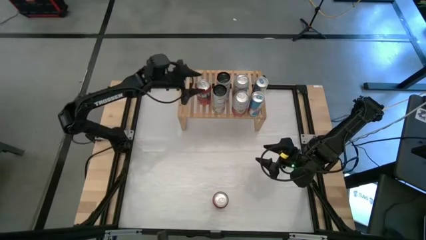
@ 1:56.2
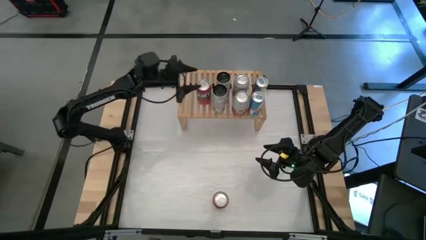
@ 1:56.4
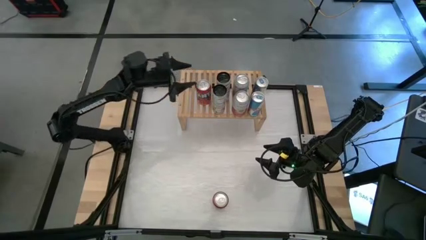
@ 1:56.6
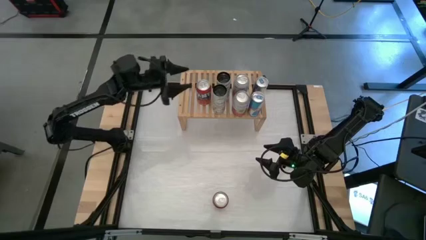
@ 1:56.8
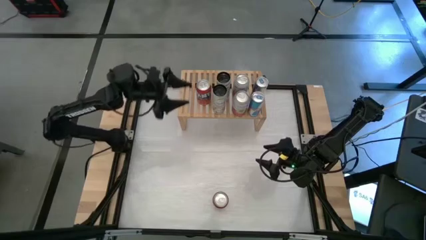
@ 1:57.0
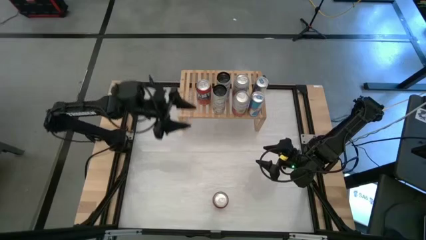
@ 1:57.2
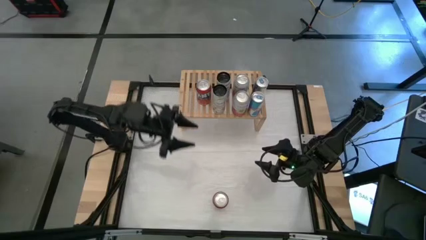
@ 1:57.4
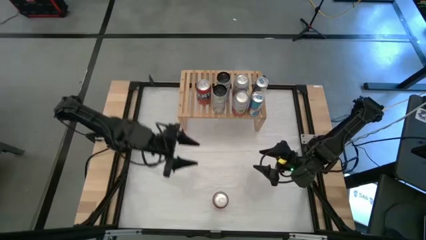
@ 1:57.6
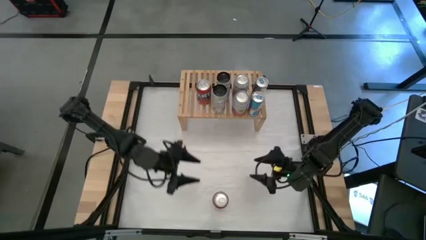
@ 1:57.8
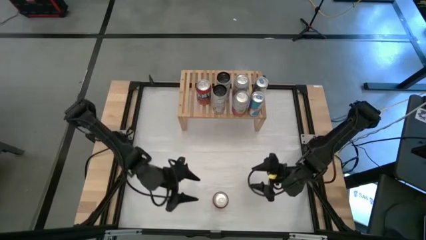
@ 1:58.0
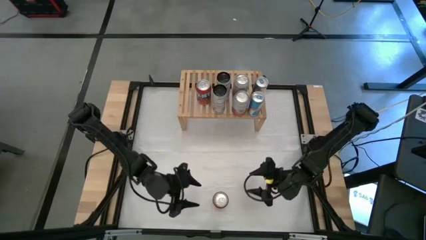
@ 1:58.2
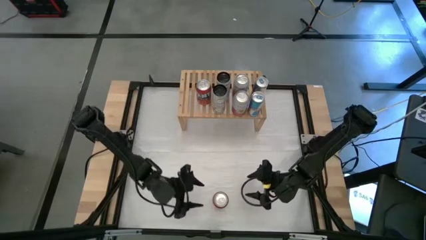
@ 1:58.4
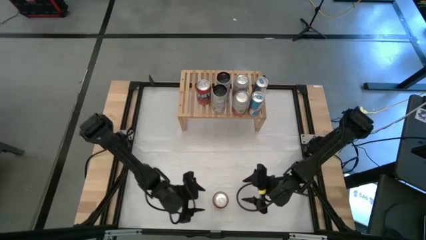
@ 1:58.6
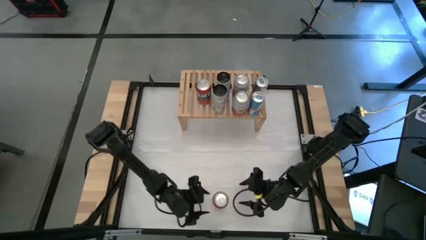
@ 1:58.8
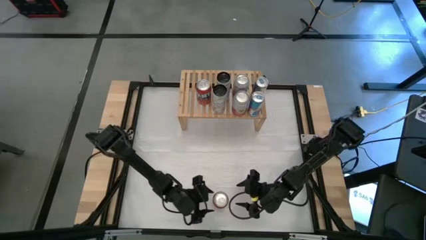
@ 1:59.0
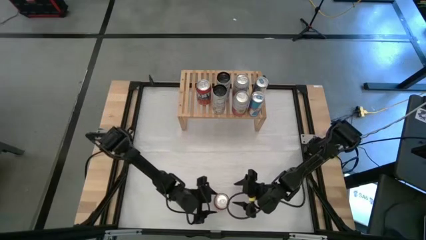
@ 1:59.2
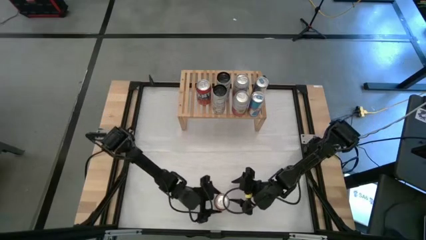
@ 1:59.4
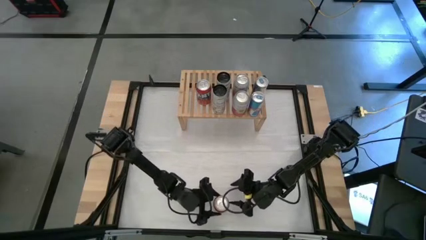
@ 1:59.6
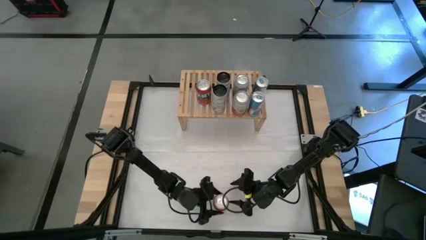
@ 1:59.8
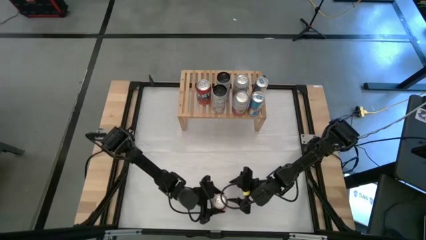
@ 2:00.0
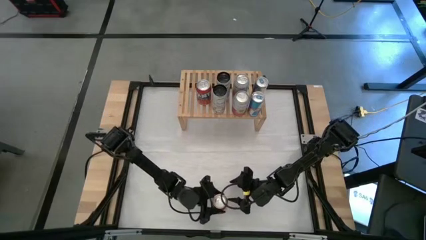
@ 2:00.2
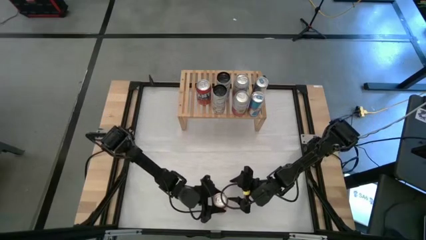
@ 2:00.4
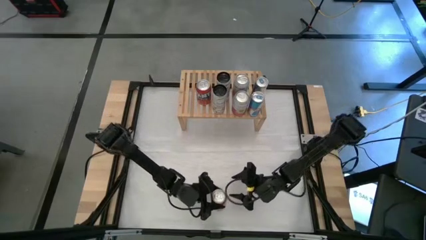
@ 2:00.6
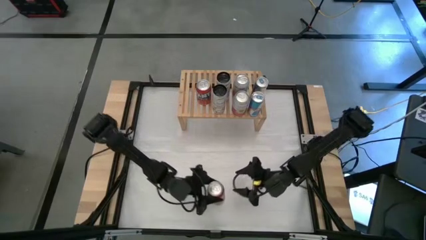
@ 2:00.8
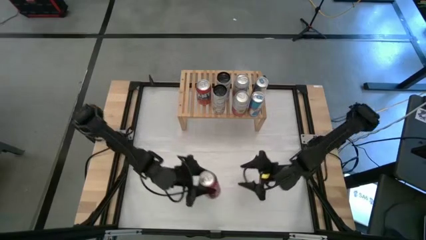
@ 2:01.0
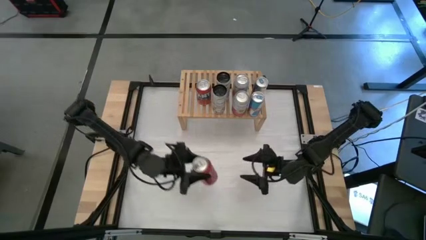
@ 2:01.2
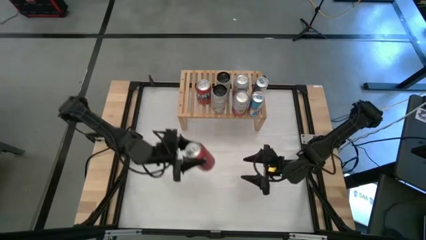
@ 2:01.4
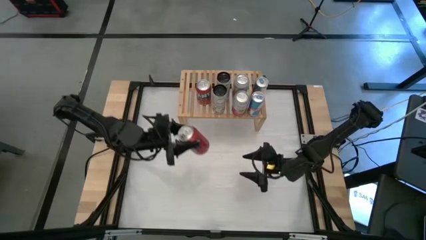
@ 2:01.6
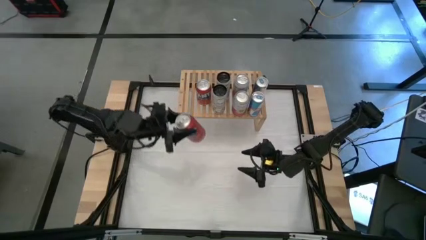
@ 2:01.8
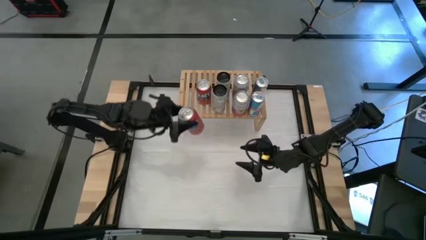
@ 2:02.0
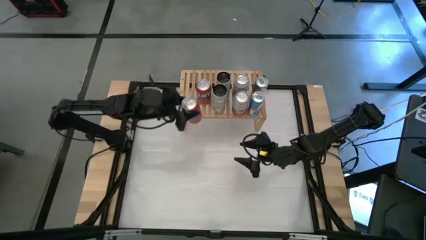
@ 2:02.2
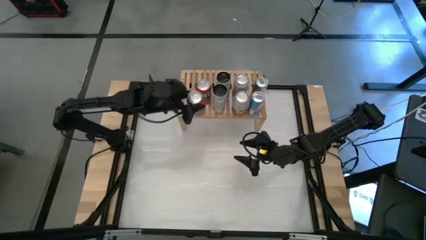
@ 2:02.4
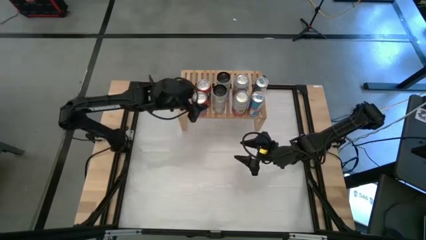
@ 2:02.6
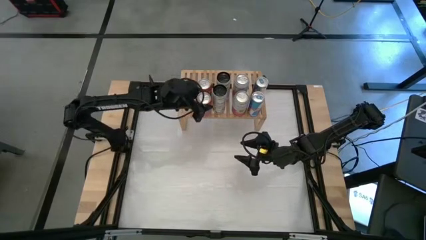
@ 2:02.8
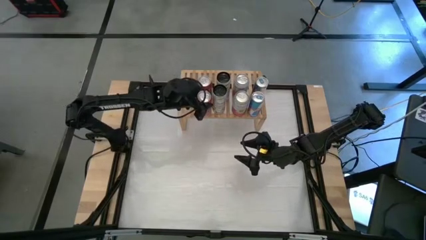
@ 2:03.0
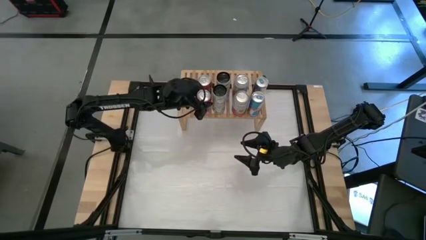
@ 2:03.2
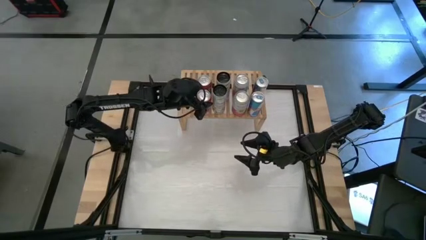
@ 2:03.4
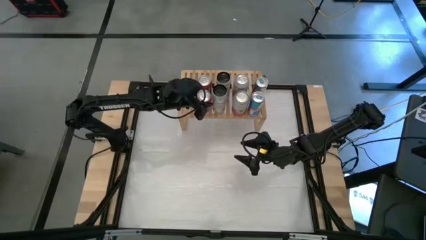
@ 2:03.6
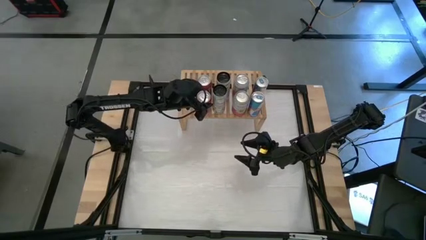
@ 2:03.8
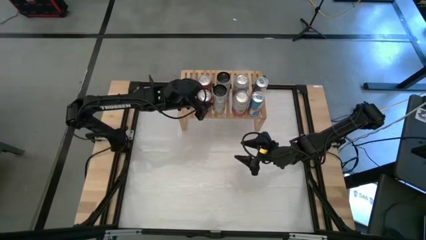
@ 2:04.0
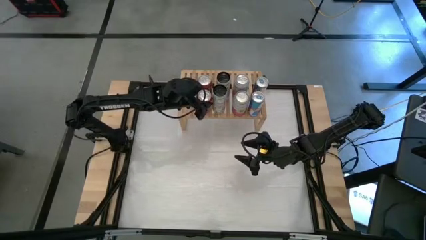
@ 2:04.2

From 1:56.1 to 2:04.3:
Task: Place canned beverage on shelf
Put the red soda can onto the shelf

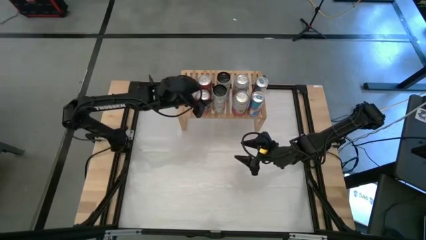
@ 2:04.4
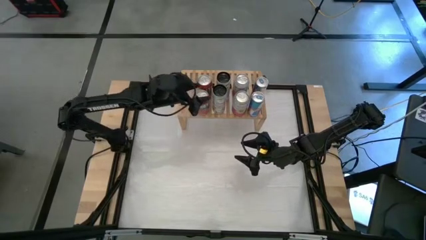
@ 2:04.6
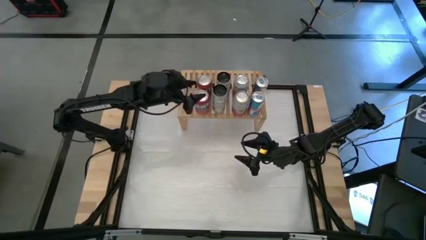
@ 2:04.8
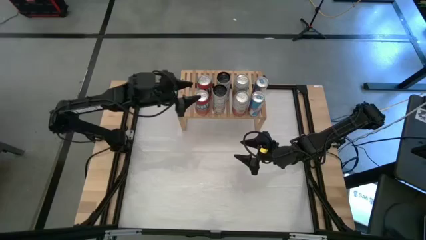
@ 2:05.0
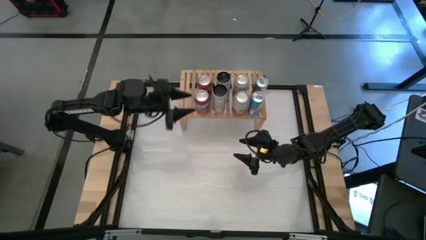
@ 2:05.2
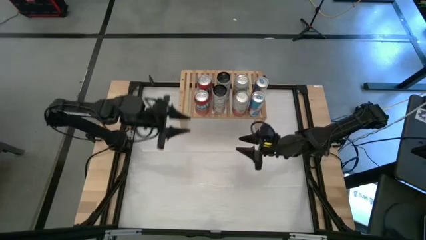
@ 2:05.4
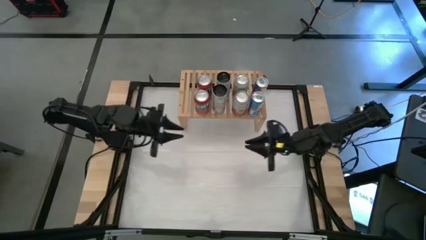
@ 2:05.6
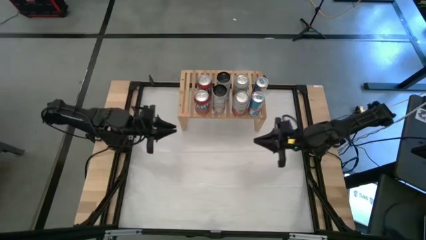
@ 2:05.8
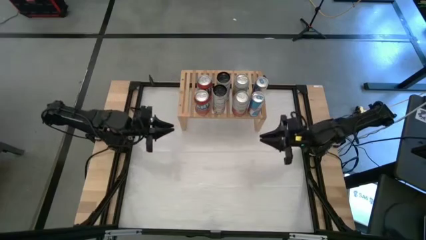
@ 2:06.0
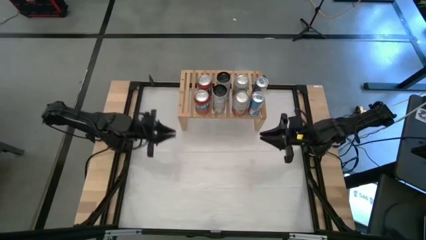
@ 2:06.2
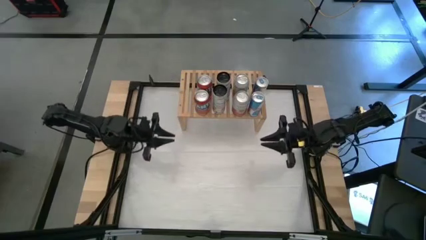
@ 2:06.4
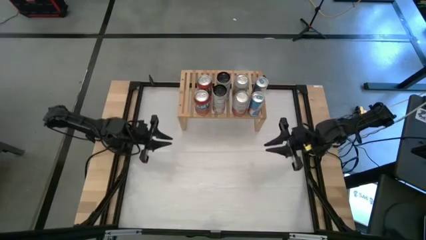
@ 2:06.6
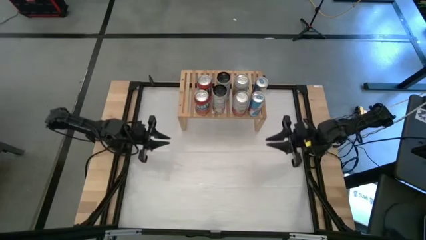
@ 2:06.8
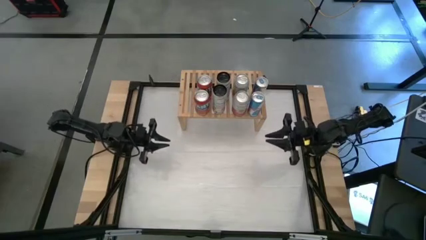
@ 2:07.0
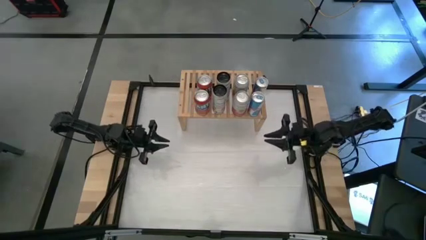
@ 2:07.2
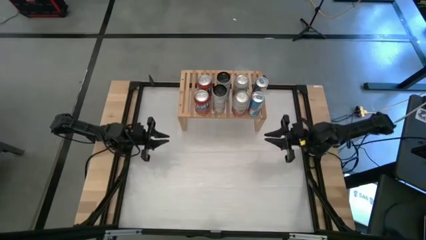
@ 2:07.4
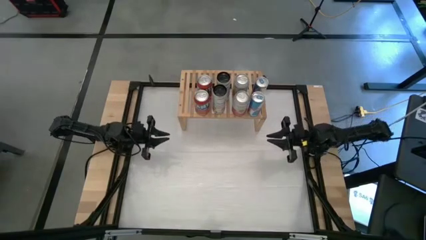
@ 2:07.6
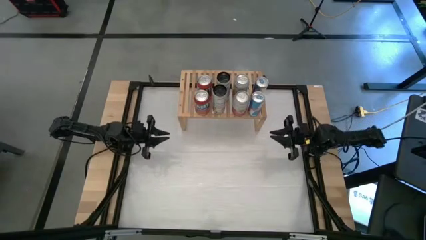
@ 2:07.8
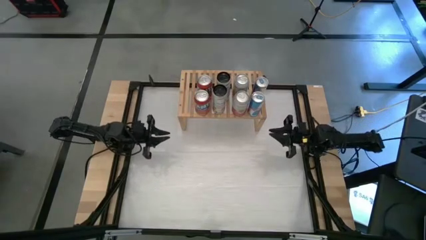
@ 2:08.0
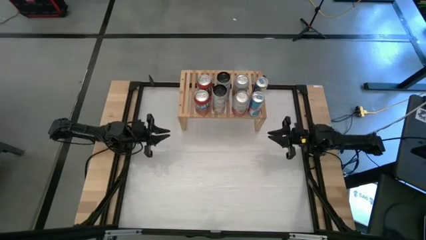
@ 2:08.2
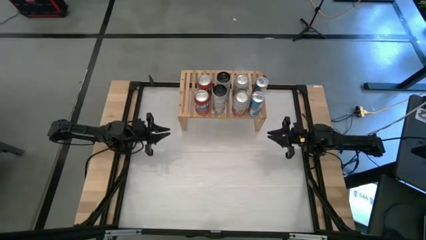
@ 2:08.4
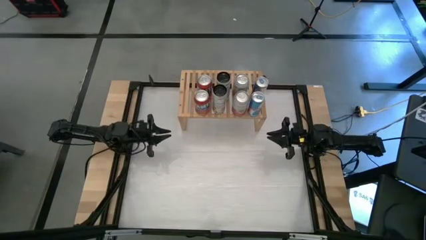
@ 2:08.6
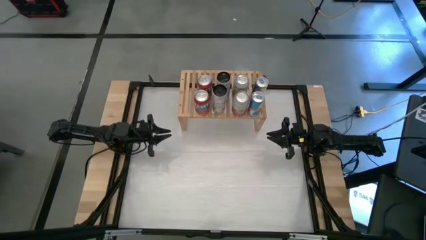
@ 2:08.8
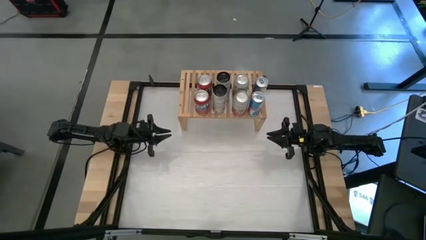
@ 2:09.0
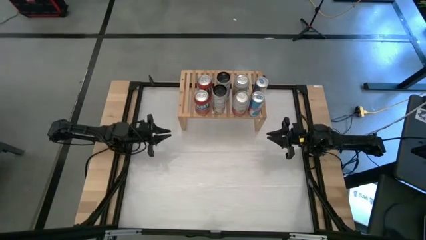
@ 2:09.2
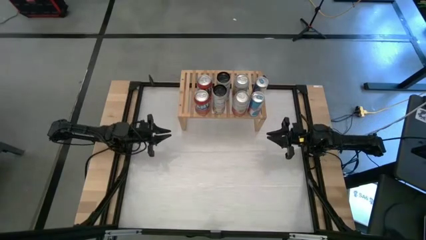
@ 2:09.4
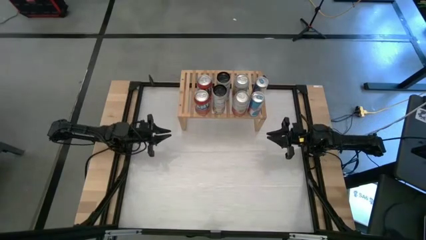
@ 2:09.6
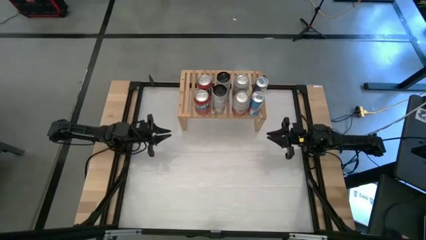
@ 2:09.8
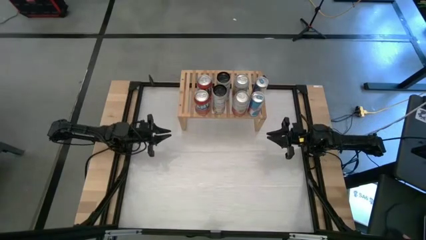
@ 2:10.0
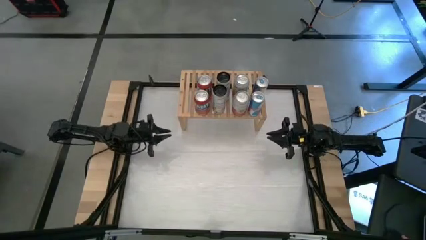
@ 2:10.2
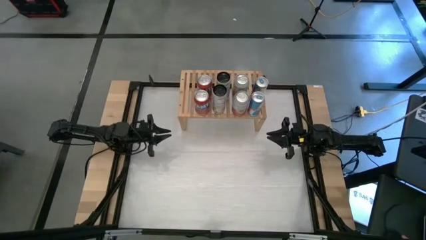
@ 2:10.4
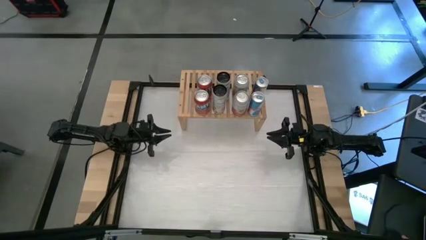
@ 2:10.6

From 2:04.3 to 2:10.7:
Return to Home Position

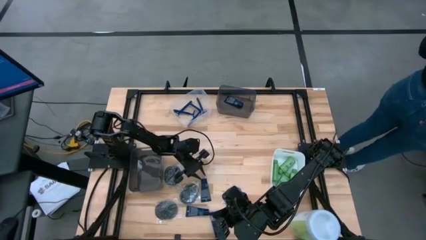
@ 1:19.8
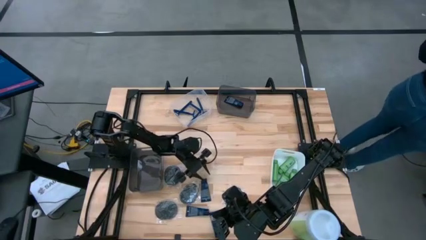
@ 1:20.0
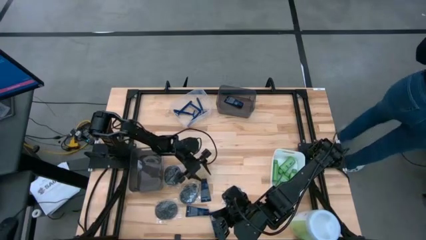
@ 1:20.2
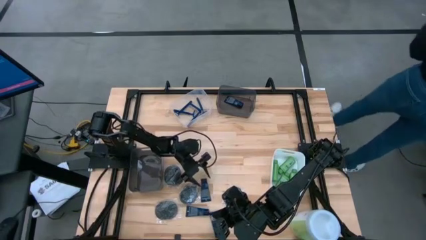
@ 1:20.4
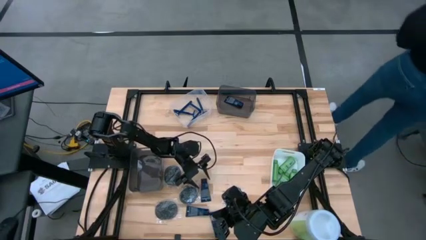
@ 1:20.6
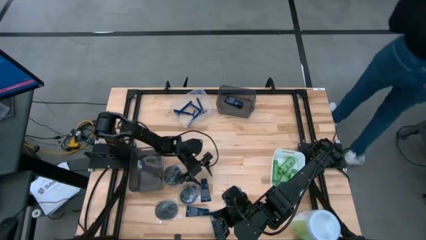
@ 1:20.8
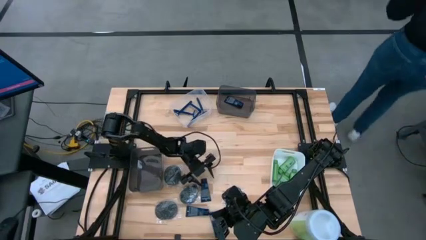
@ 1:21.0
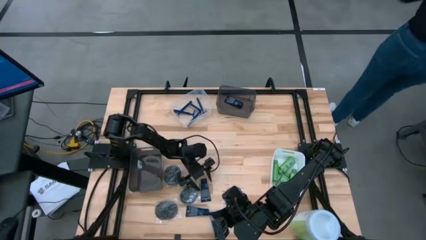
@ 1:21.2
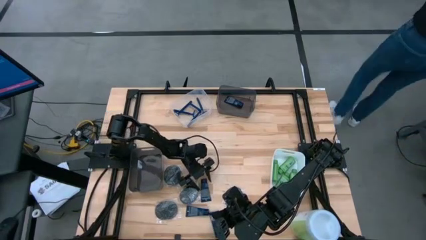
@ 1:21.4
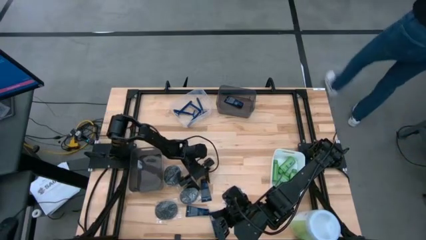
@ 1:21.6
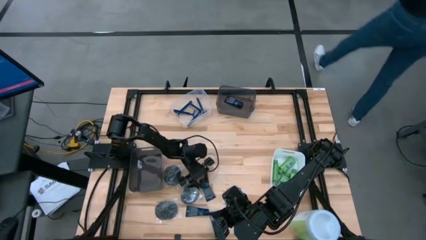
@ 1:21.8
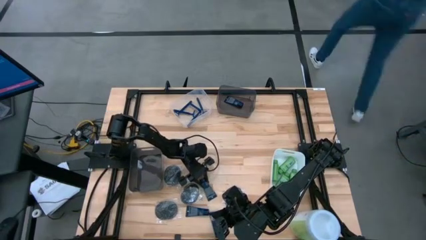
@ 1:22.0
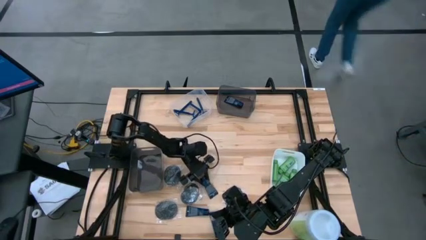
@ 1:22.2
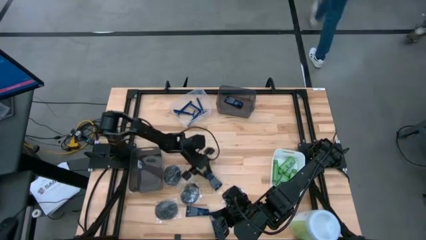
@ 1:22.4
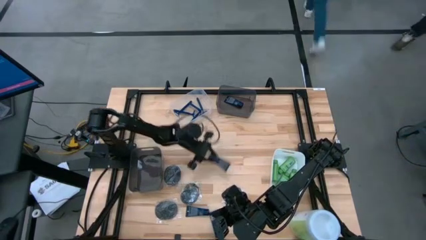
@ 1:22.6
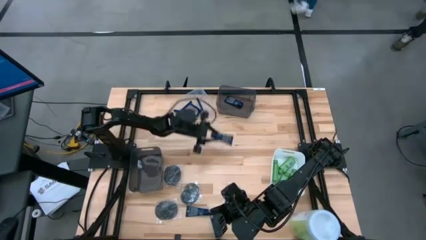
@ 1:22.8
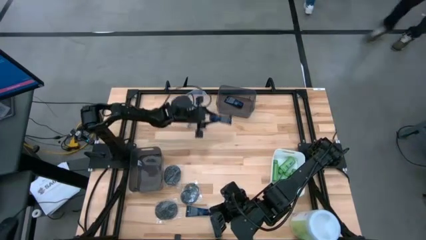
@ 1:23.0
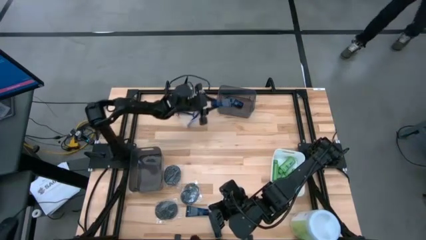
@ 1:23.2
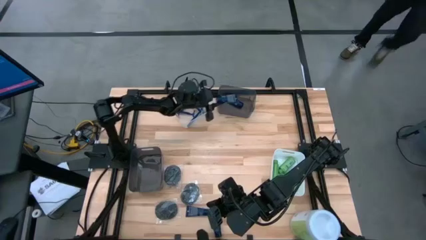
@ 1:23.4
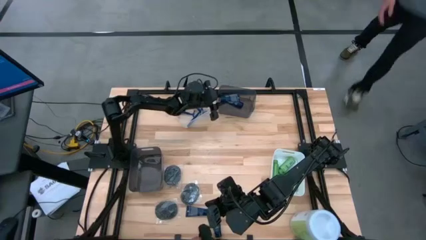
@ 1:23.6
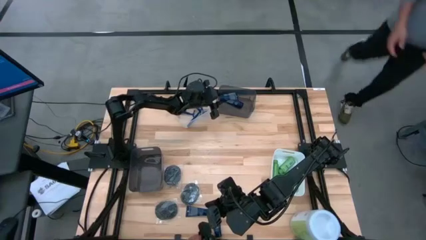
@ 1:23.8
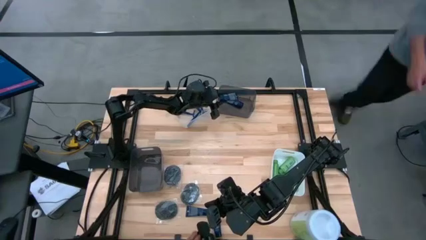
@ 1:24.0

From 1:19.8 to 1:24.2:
Task: Pick & Place Travel size toiletries
Put the blue shave cream into the top black bin
